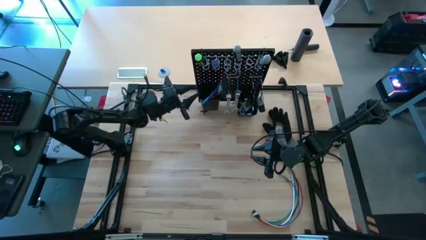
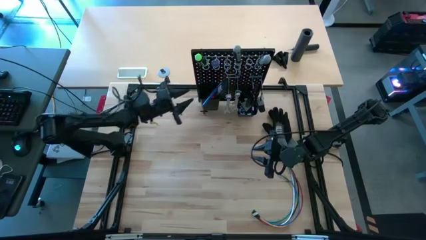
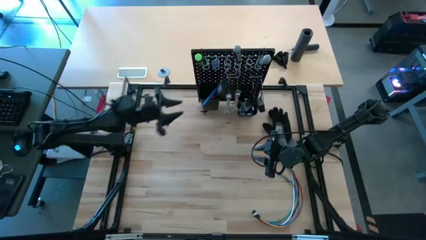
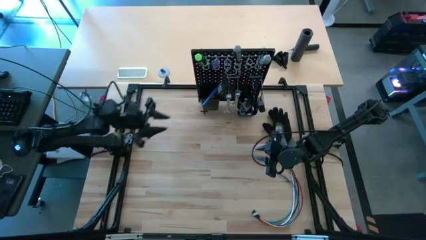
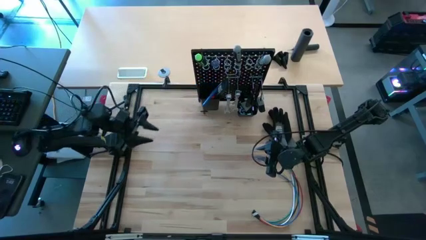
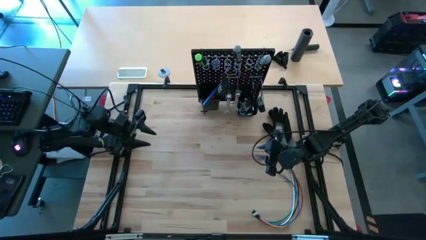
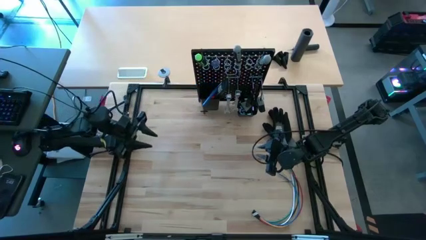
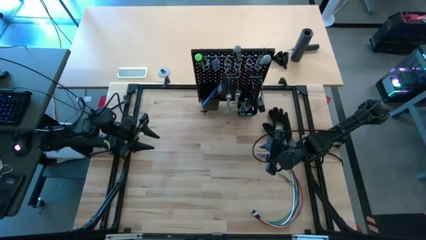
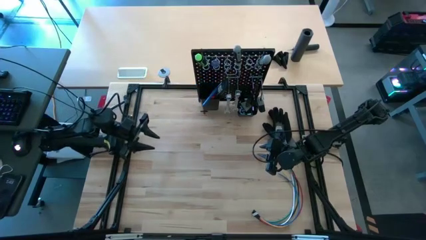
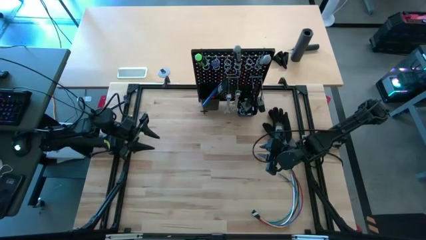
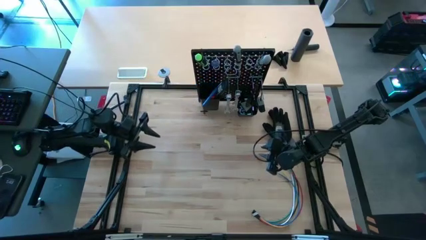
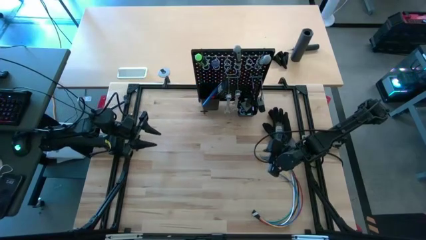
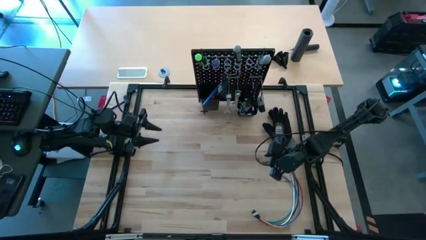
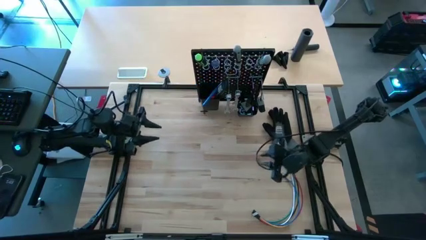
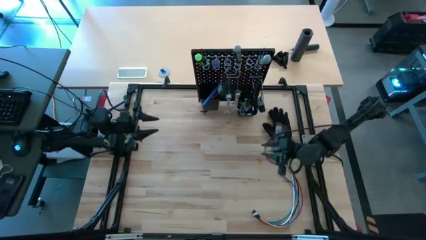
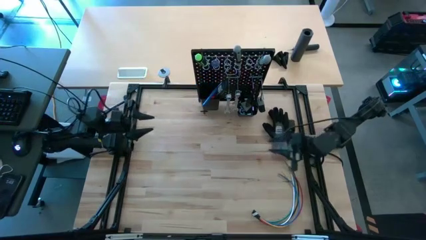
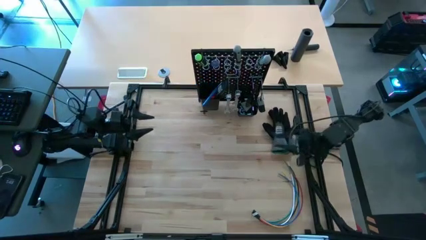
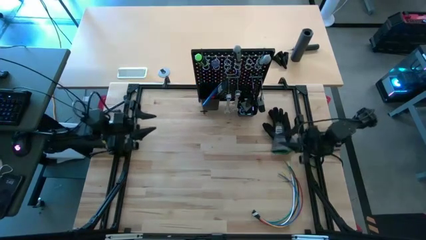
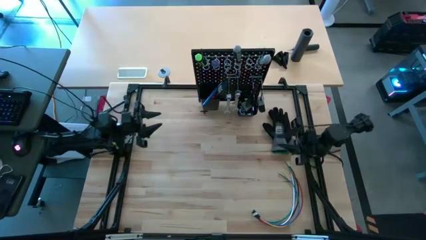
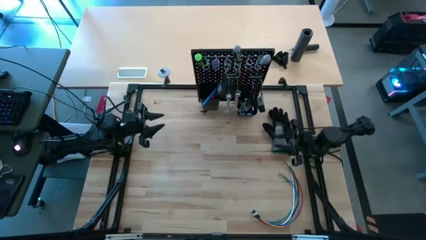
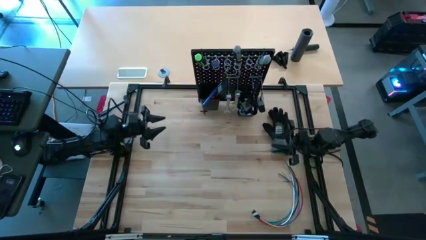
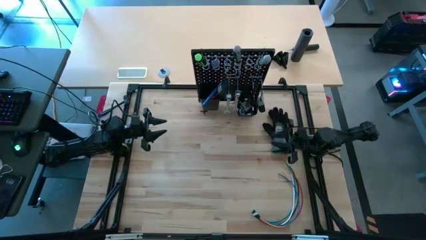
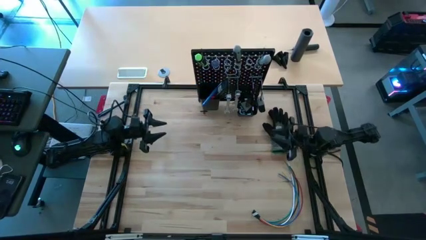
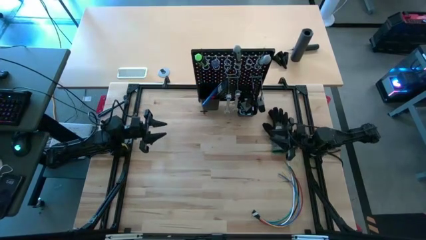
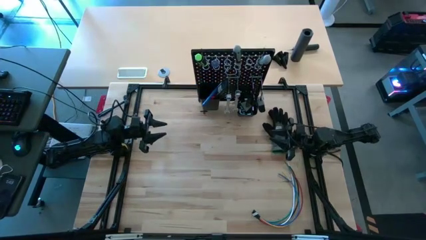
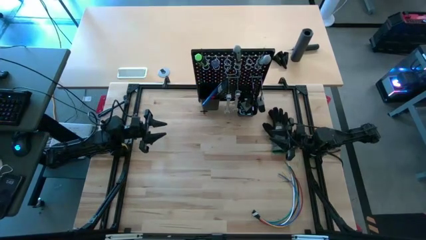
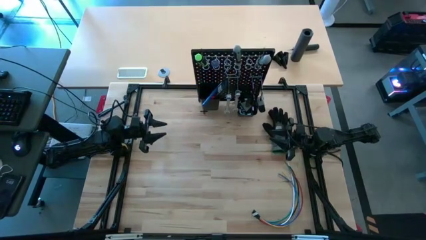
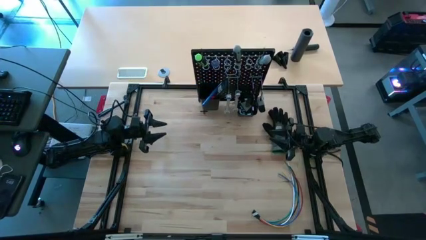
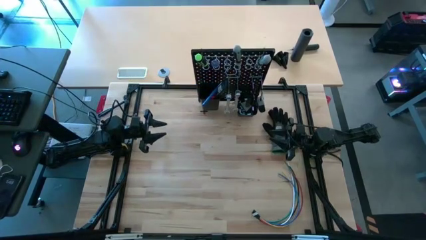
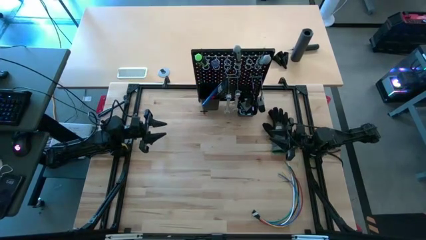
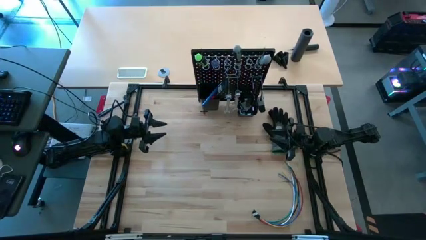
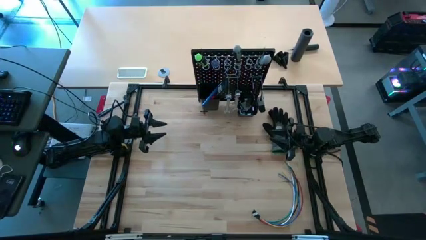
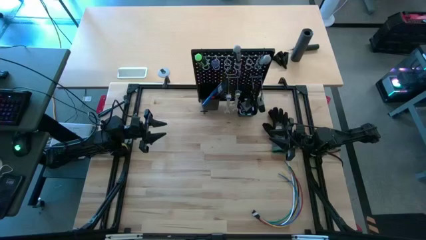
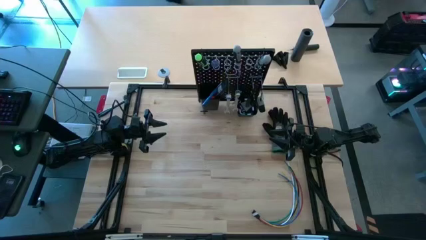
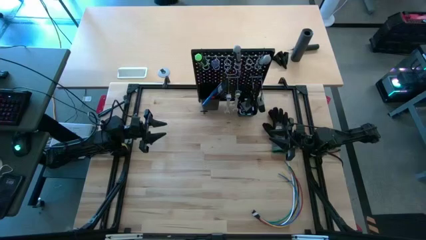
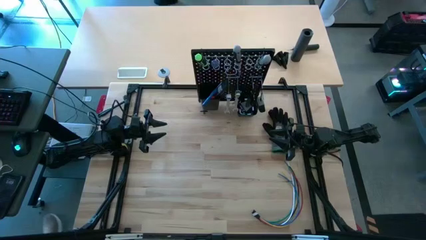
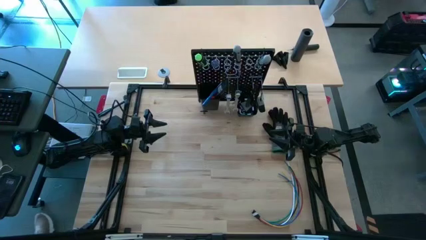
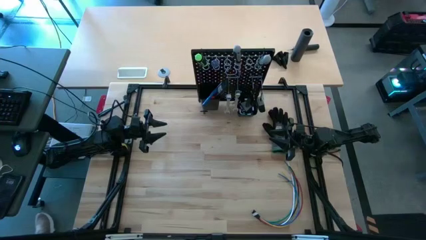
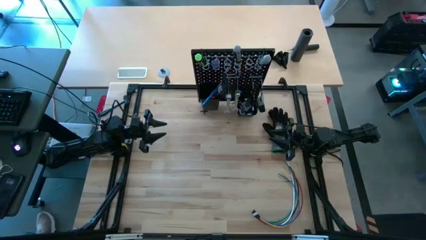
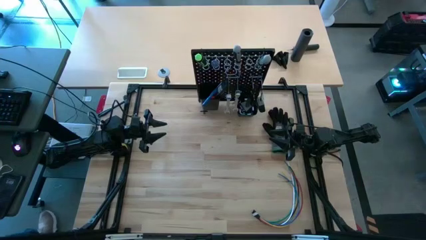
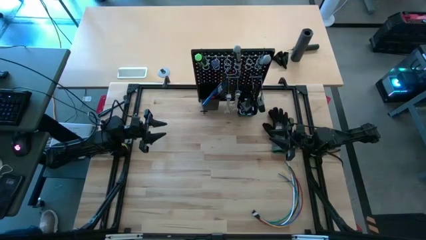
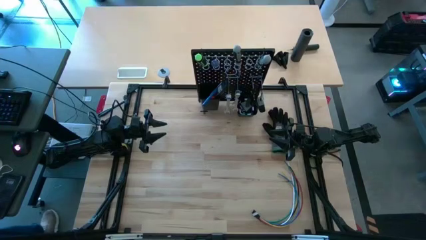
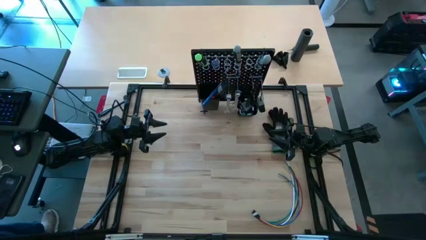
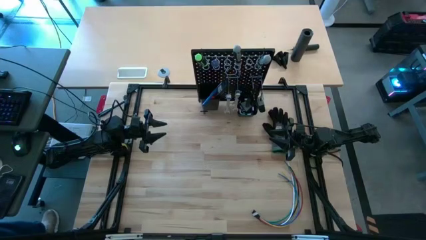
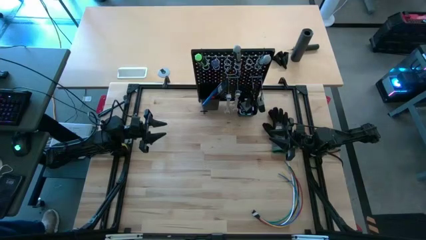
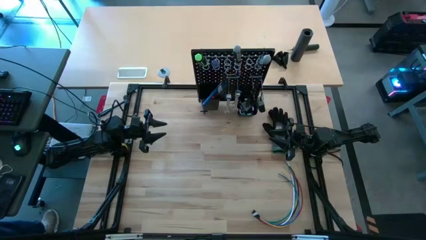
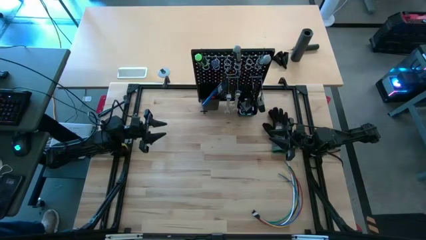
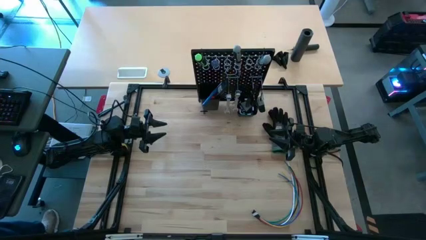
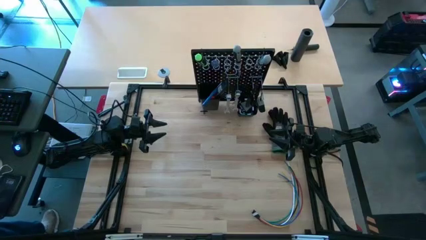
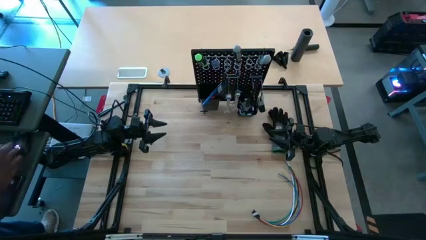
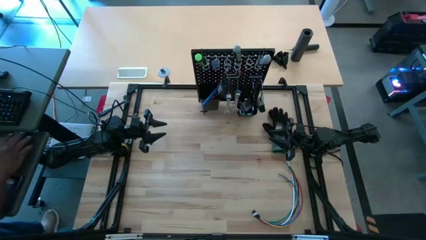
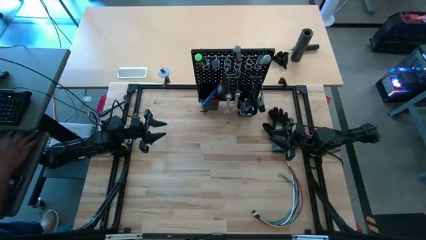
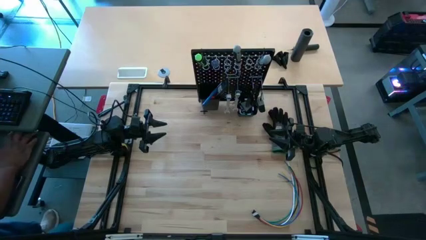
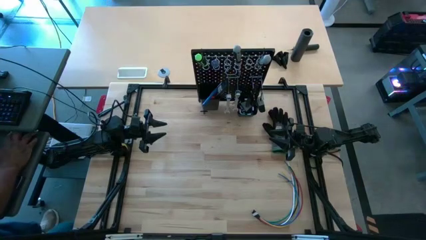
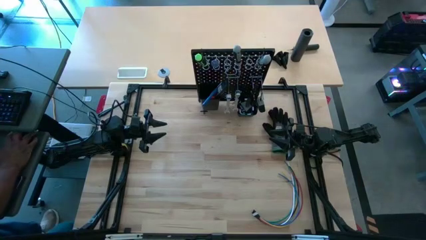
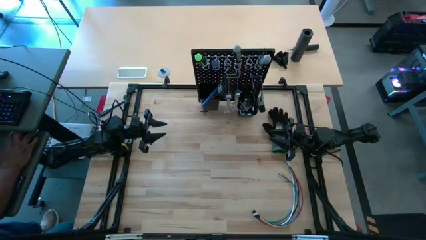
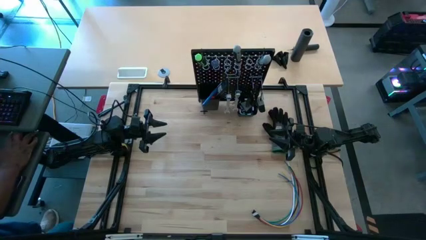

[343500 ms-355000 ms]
Task: Hang tools onto peg board
Return to Home Position
